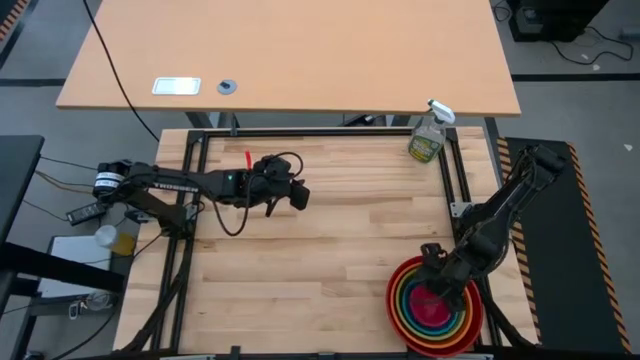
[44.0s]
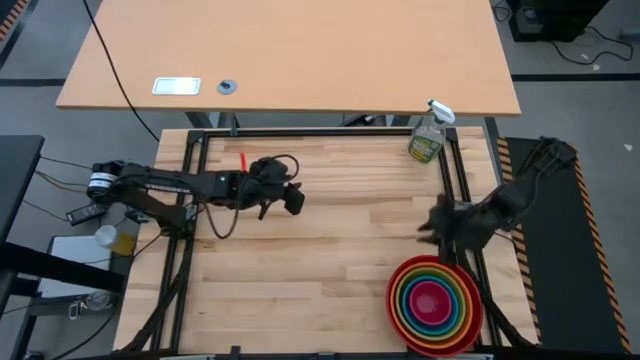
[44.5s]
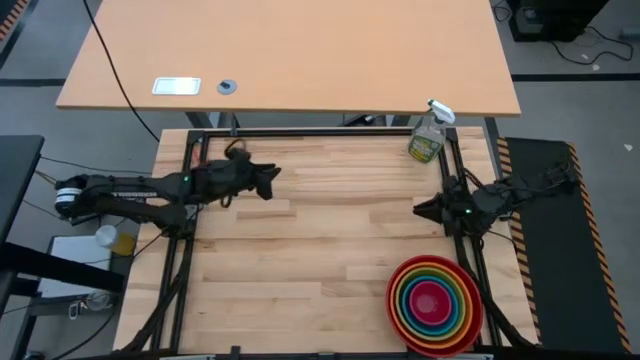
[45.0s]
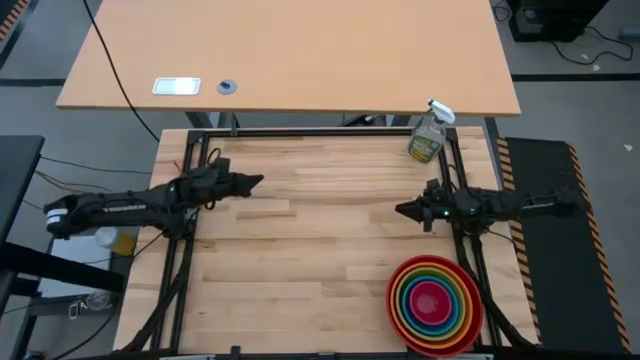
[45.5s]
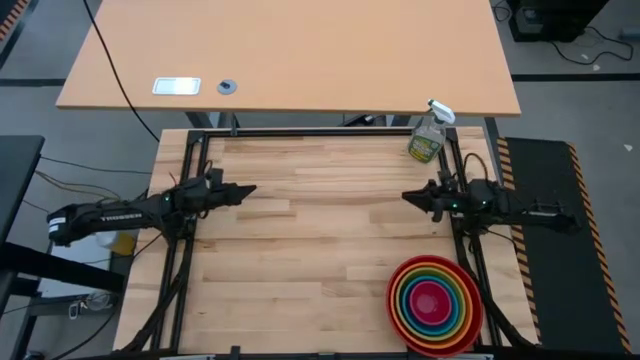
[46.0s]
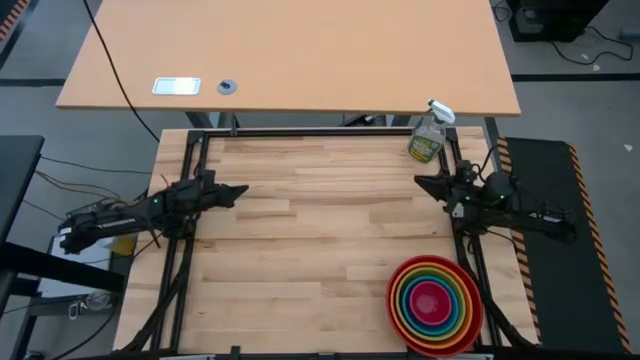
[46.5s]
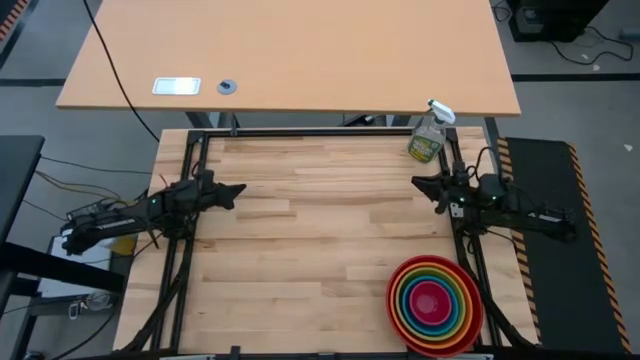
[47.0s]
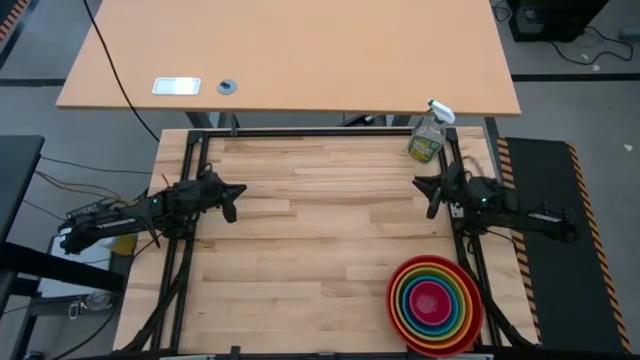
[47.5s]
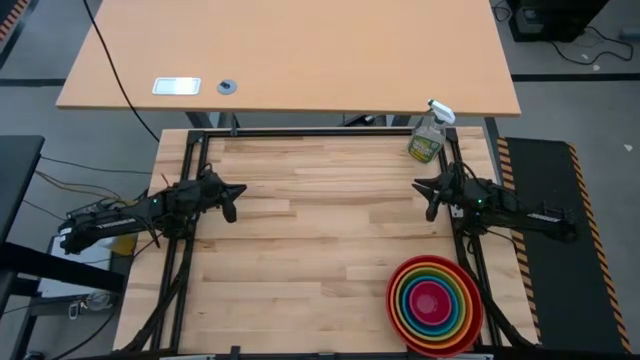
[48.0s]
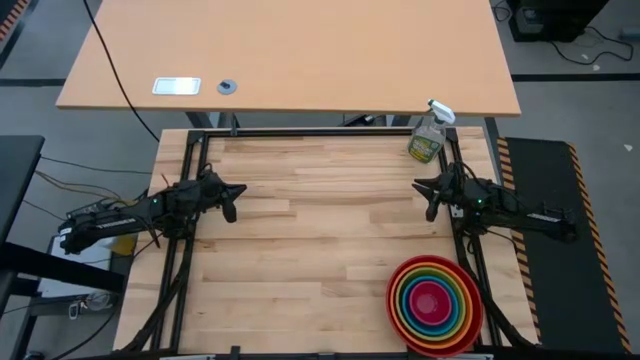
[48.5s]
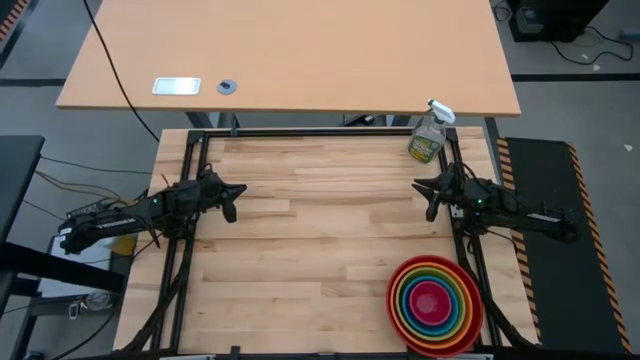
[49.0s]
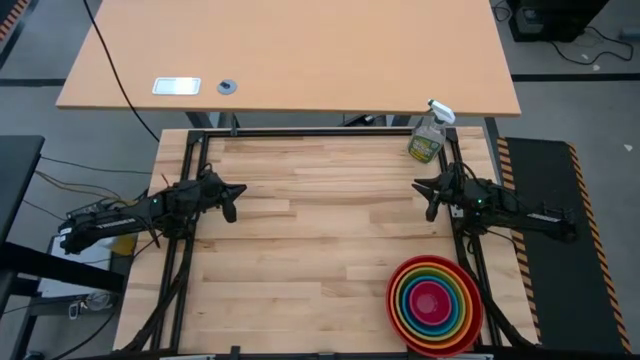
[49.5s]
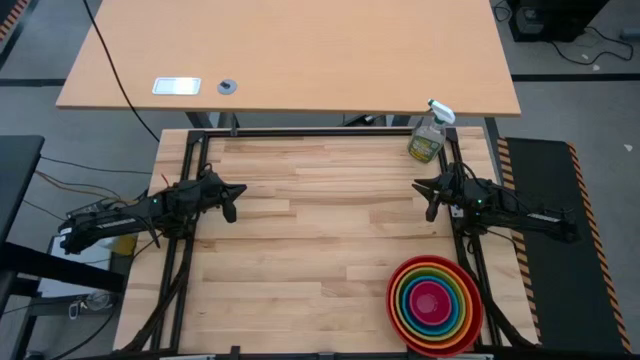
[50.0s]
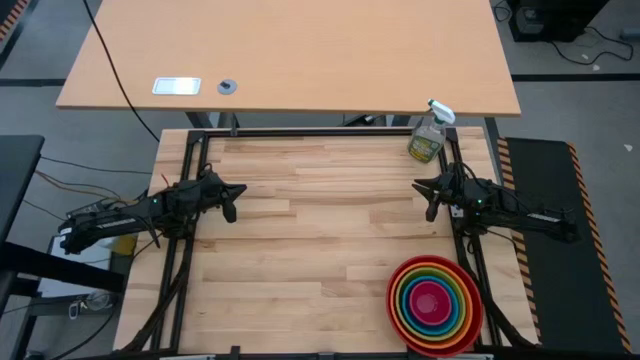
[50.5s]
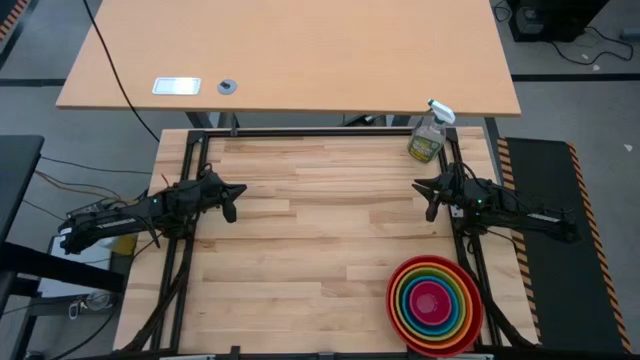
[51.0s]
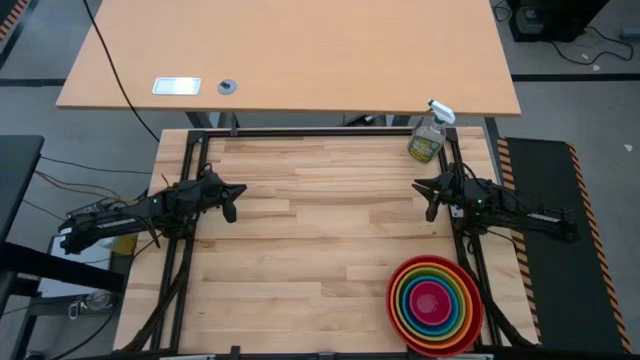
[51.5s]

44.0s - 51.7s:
Return to Home Position

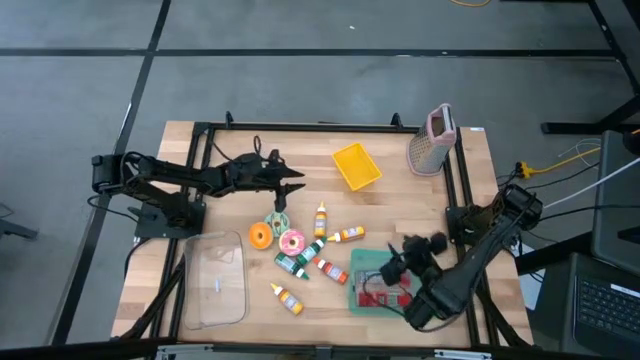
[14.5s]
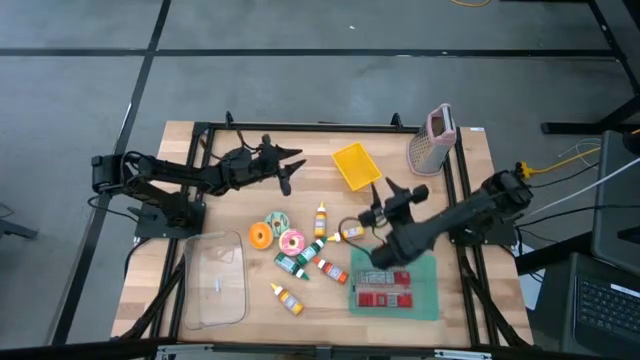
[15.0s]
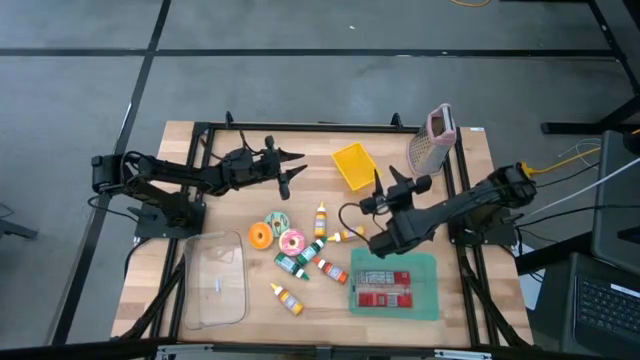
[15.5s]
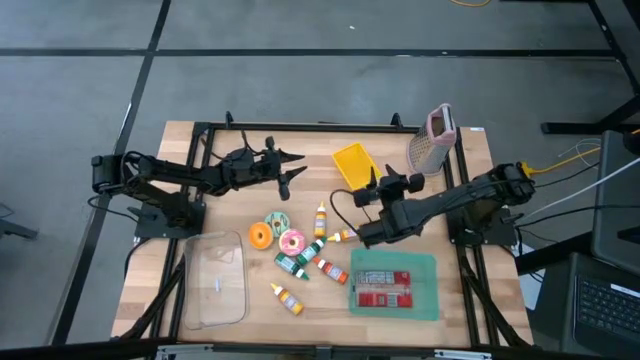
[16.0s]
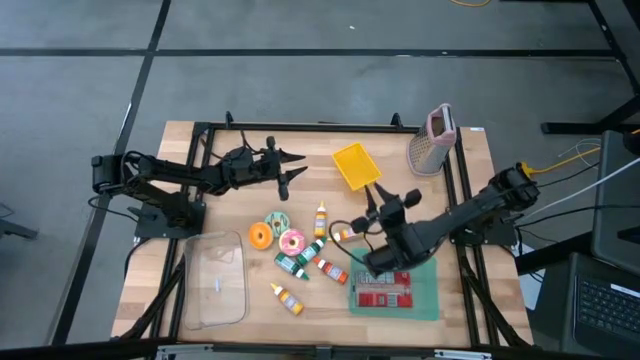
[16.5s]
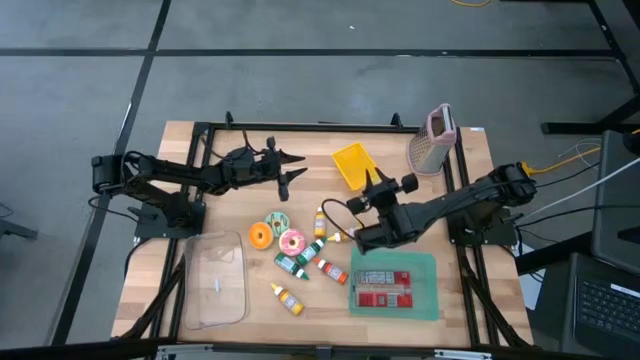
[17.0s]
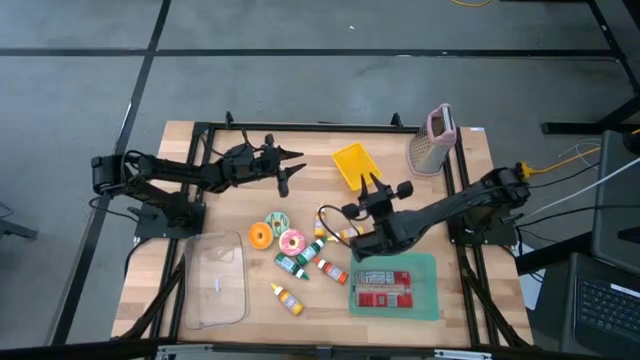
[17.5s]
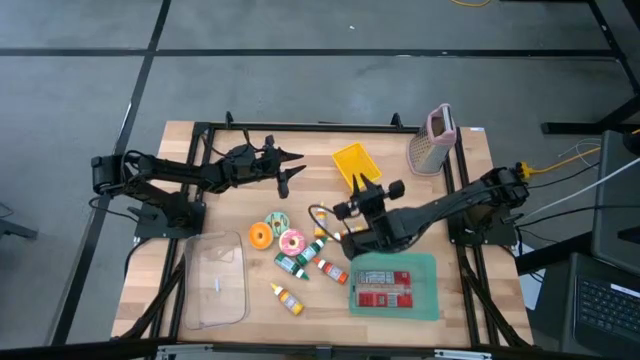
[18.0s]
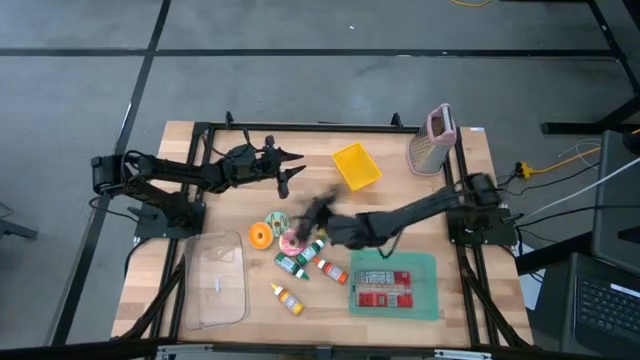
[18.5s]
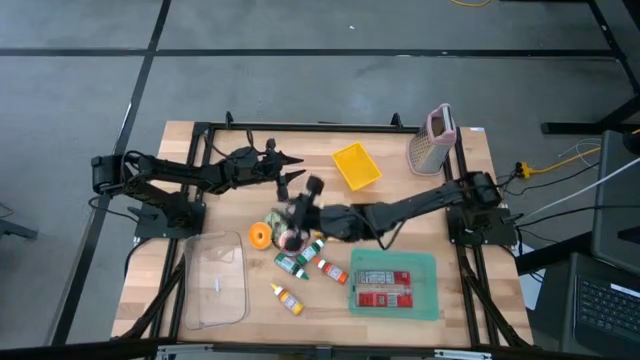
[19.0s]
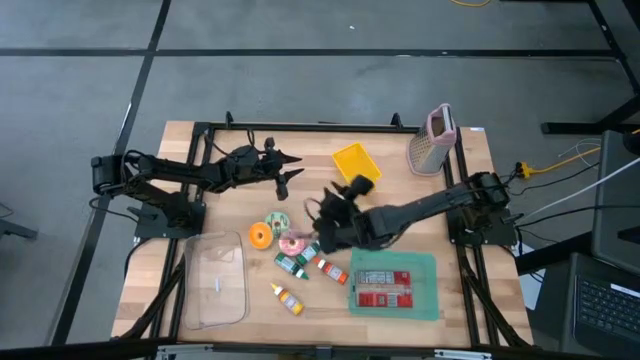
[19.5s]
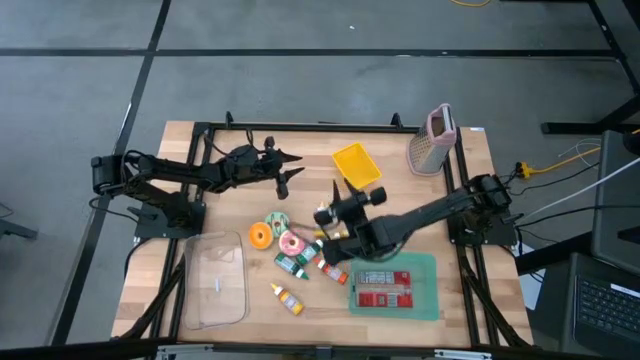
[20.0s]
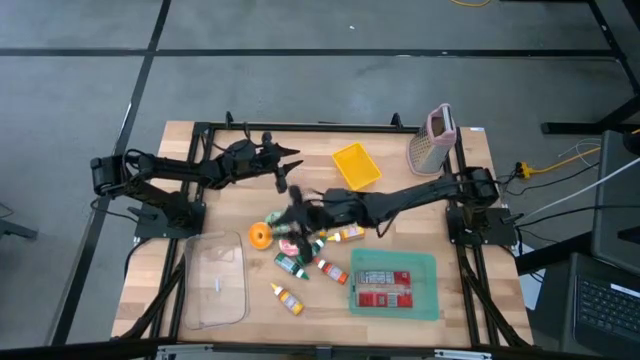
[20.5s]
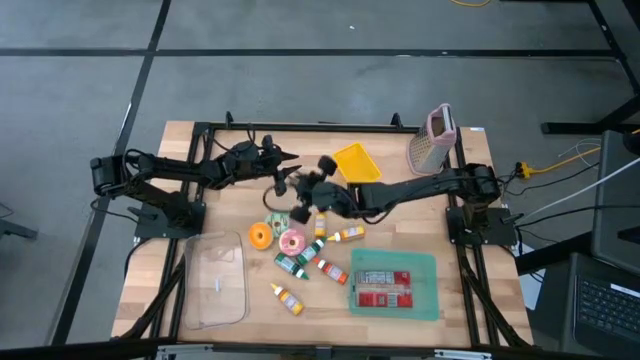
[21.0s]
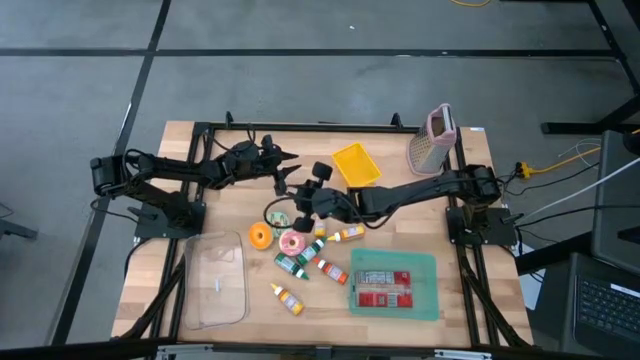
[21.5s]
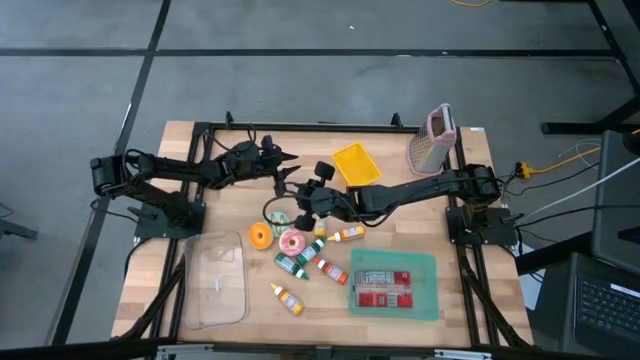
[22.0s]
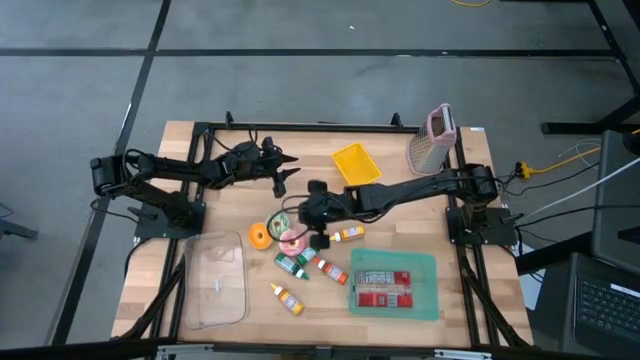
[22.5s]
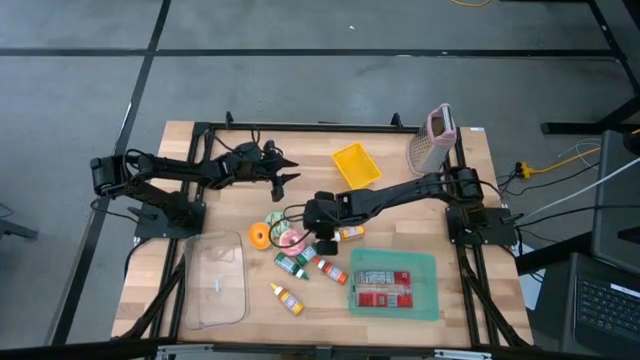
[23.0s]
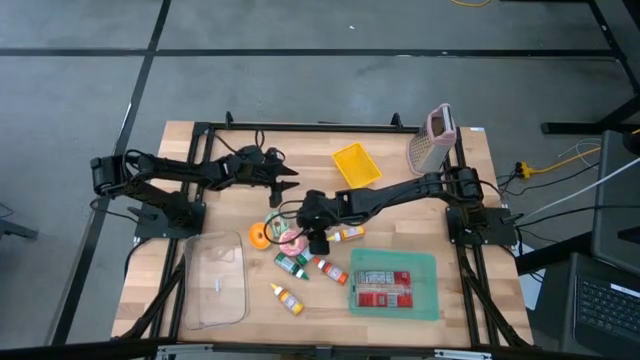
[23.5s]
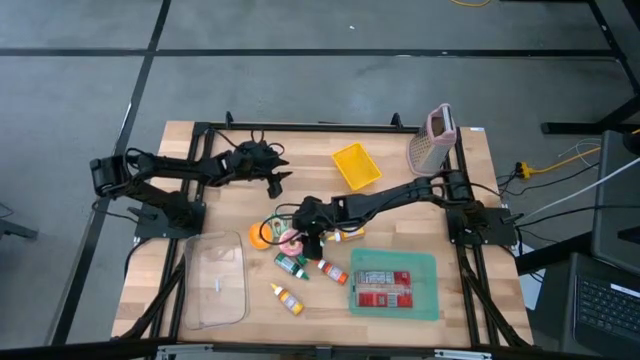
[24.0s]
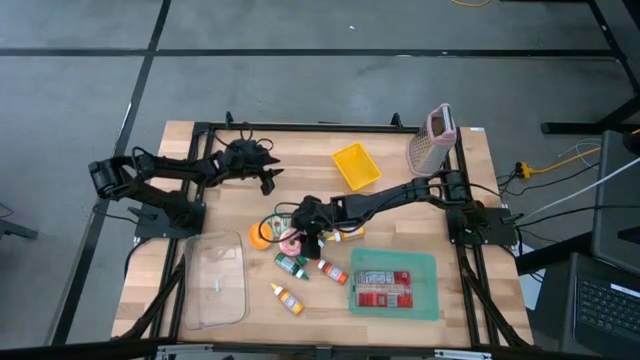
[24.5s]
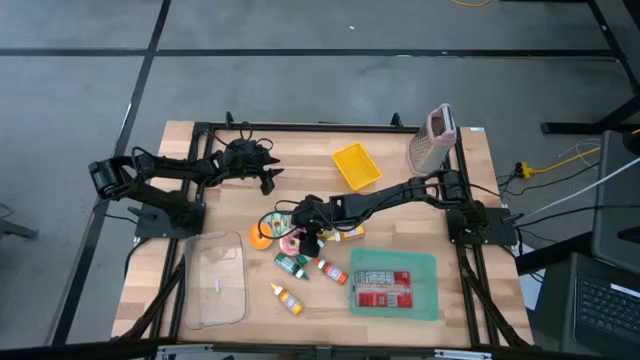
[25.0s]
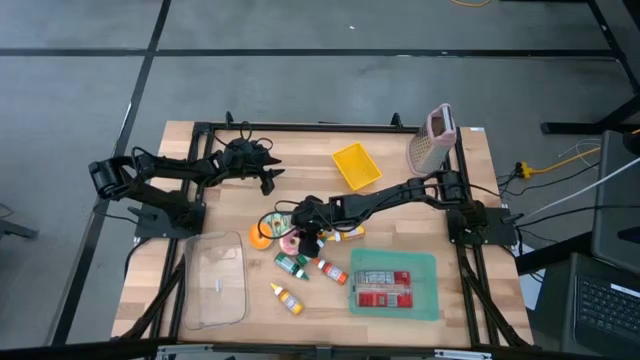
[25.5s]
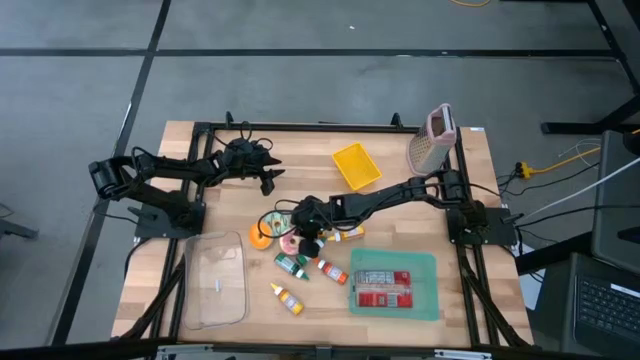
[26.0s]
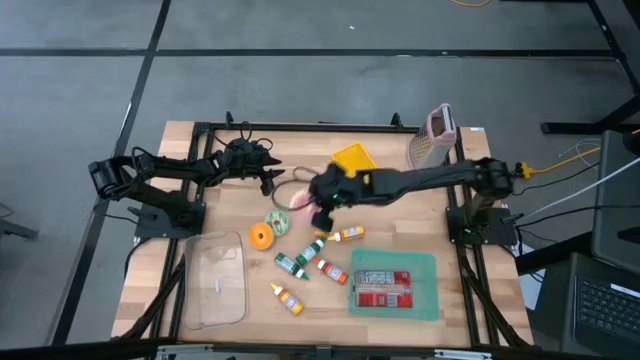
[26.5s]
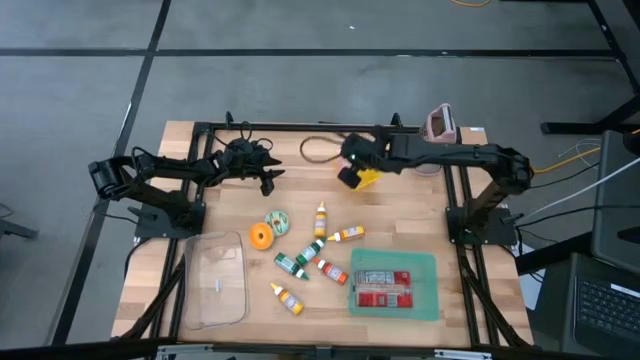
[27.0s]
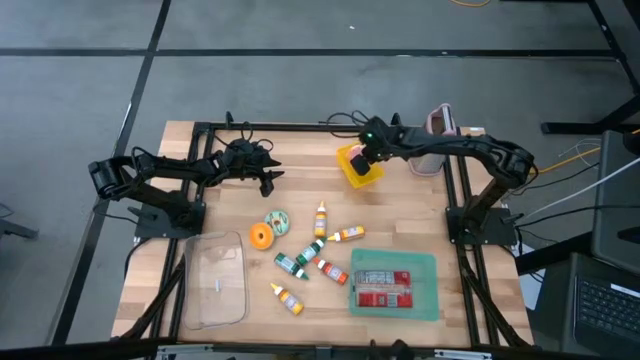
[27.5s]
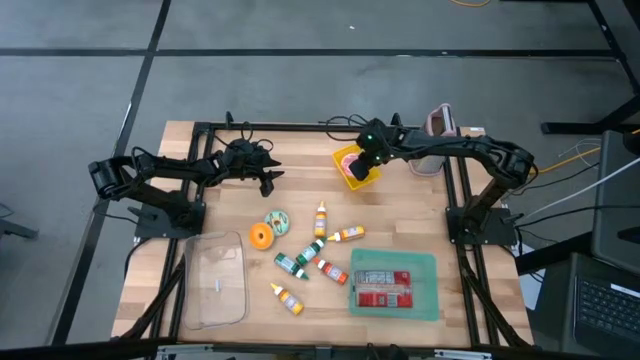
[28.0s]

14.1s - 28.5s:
Put the bottom right pink donut into the yellow bin
